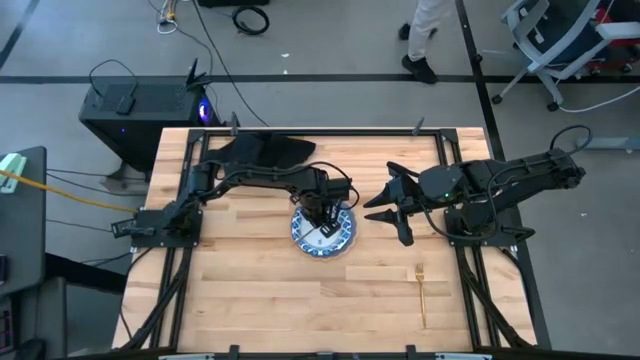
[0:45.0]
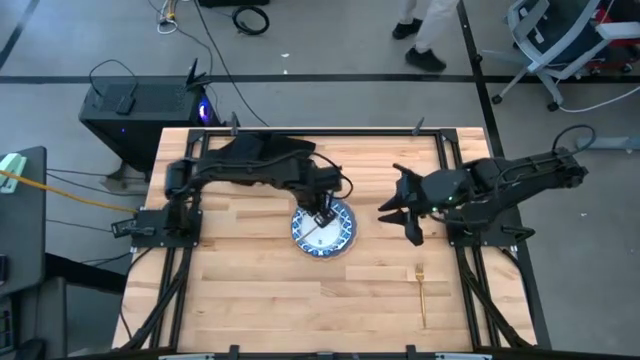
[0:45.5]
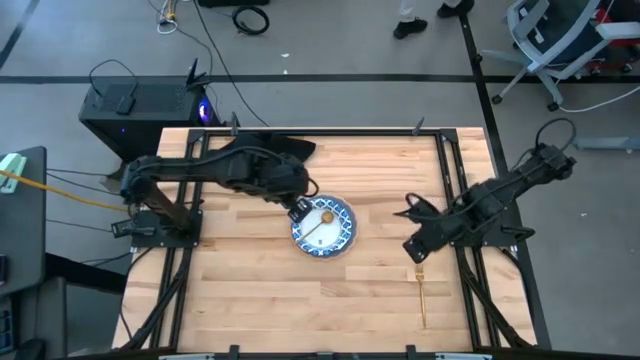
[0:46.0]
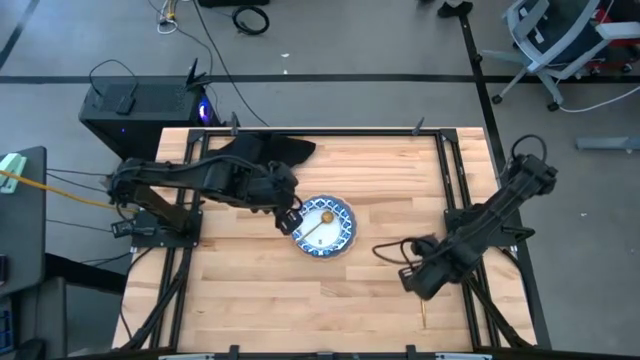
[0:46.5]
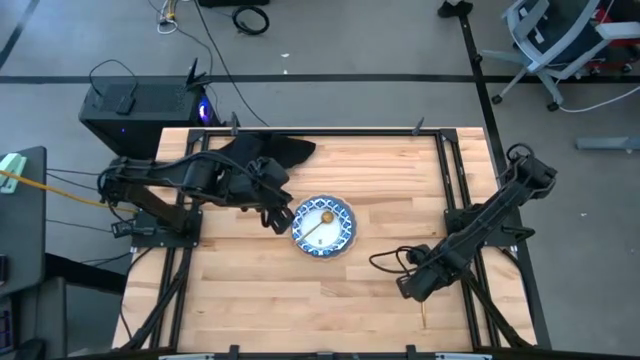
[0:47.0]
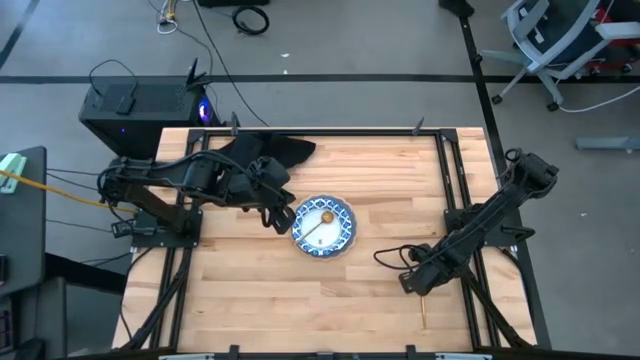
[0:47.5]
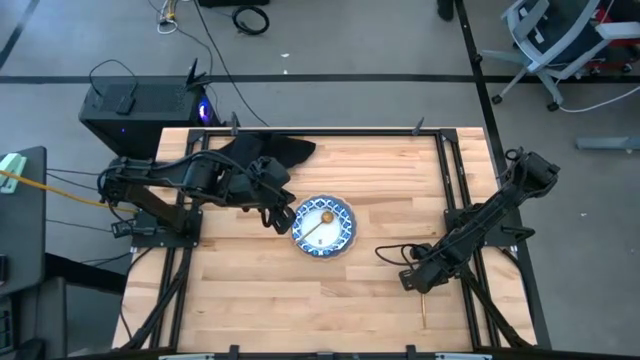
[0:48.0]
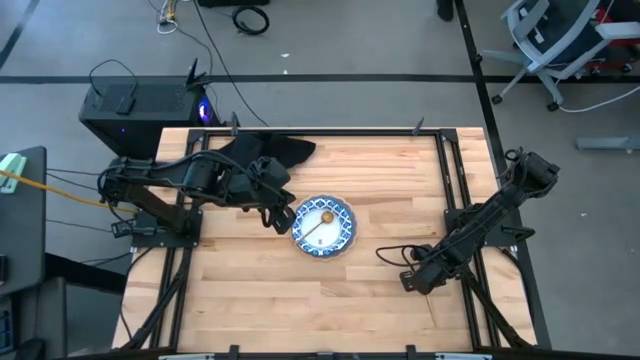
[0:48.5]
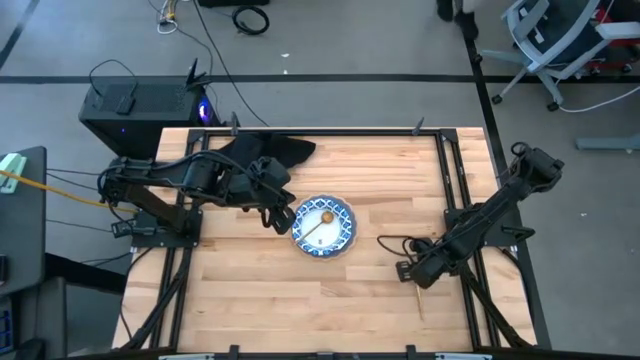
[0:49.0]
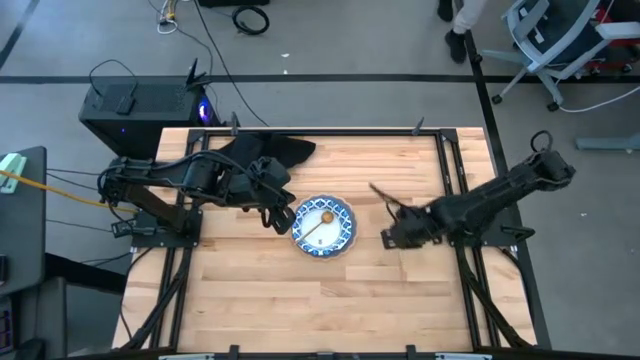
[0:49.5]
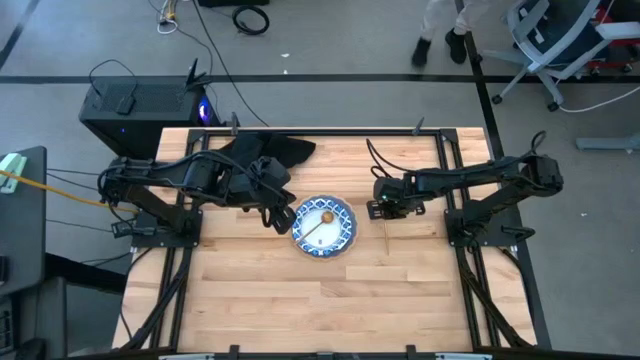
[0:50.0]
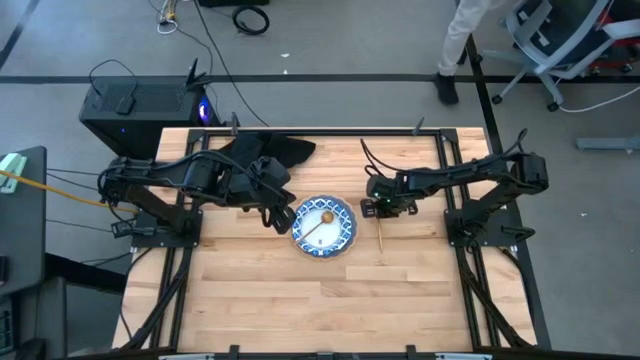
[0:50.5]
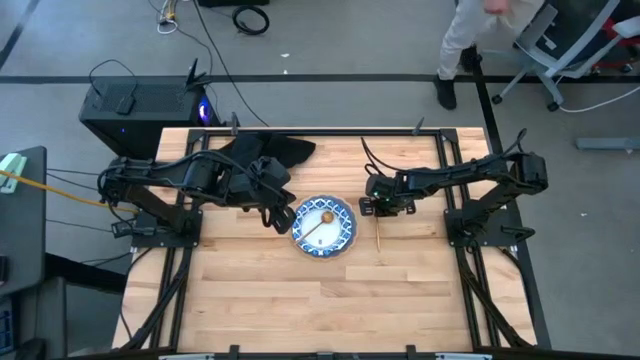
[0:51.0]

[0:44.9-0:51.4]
Task: Set table place
Put the golden fork to the right of the gray plate

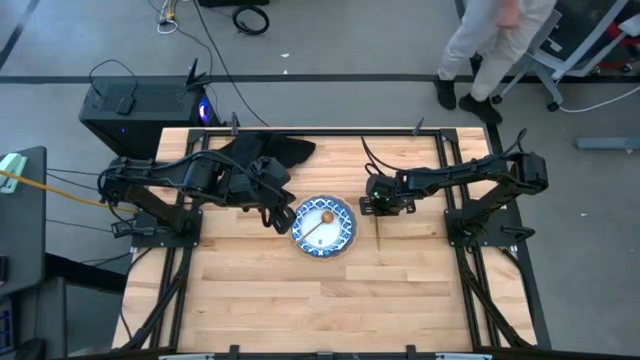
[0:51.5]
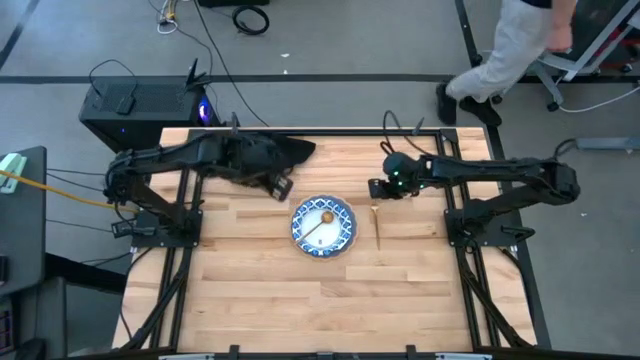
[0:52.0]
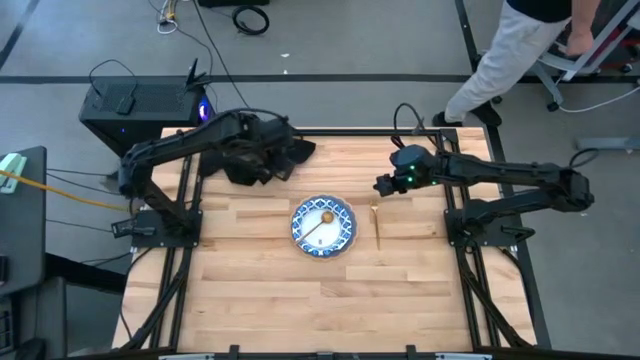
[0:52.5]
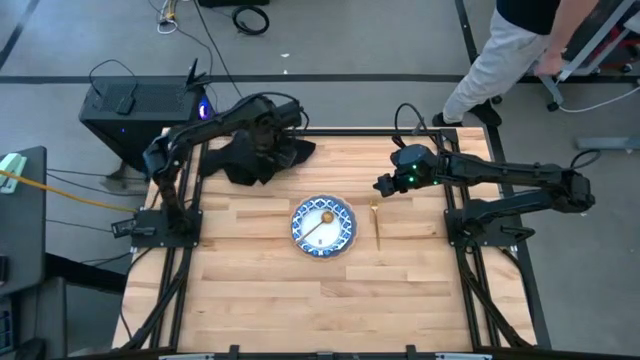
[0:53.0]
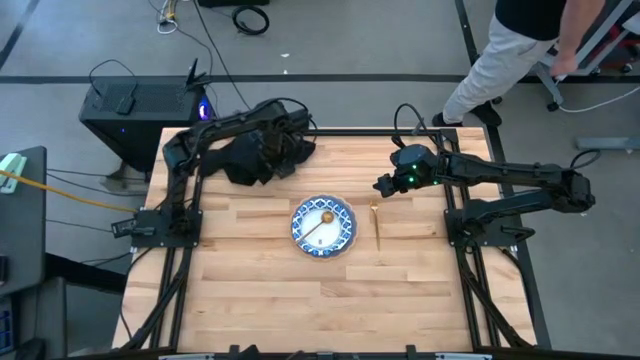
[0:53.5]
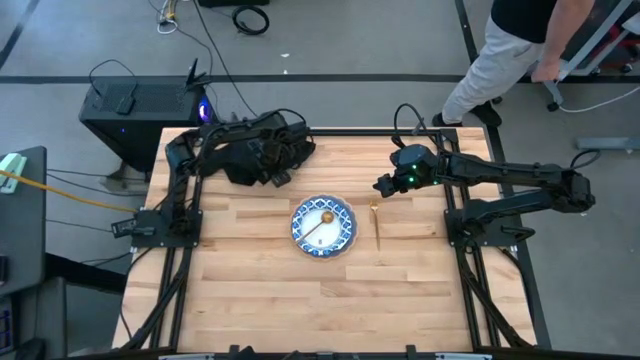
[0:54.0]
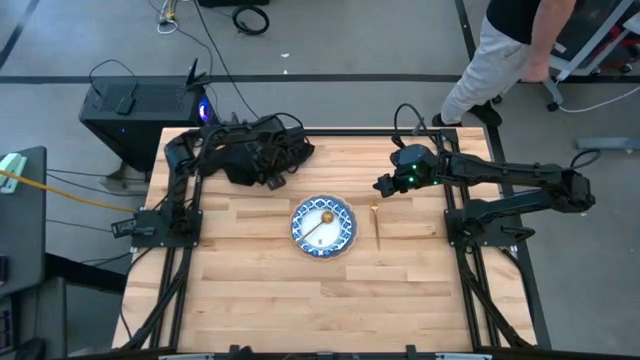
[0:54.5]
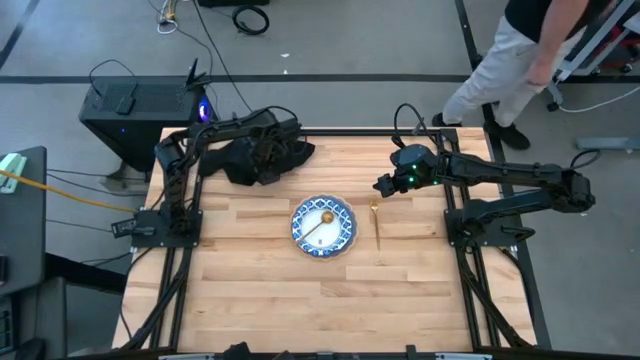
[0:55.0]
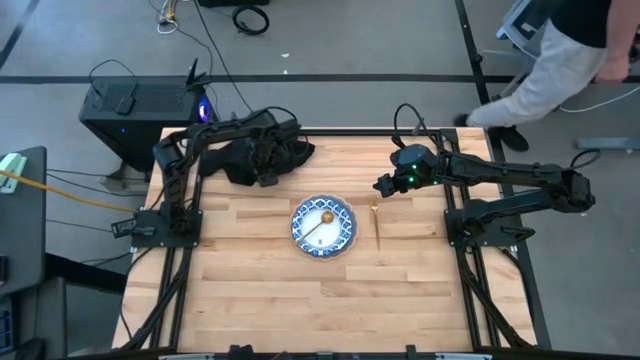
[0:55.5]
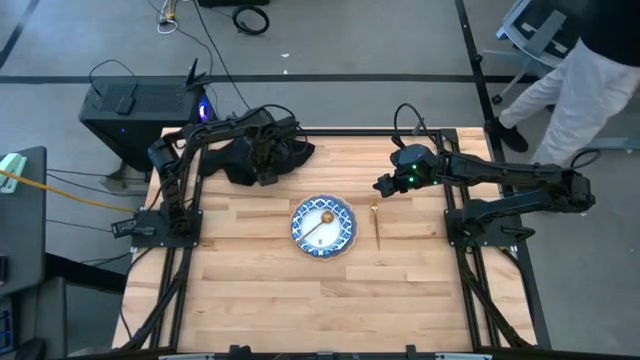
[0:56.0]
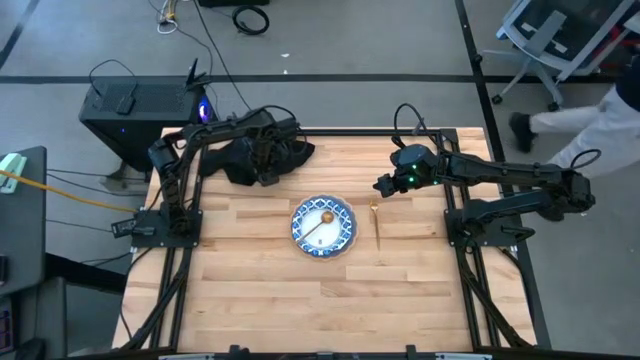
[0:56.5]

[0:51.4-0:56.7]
Fold the black napkin

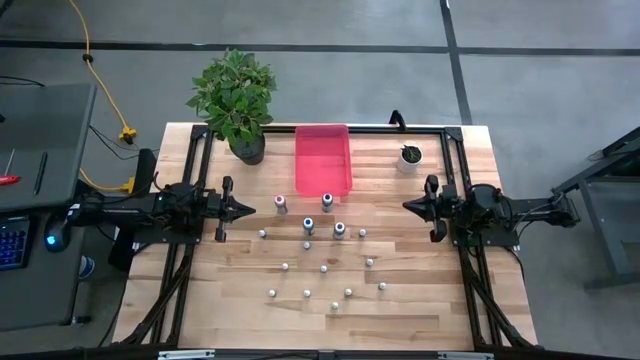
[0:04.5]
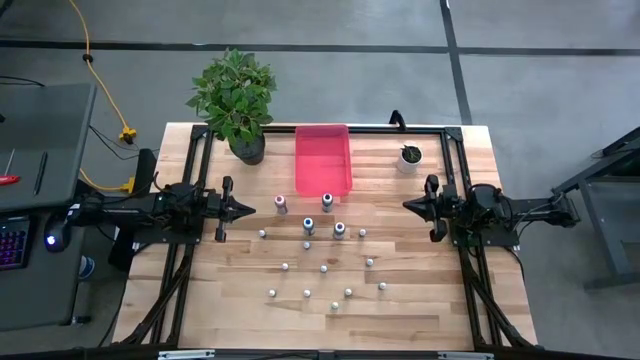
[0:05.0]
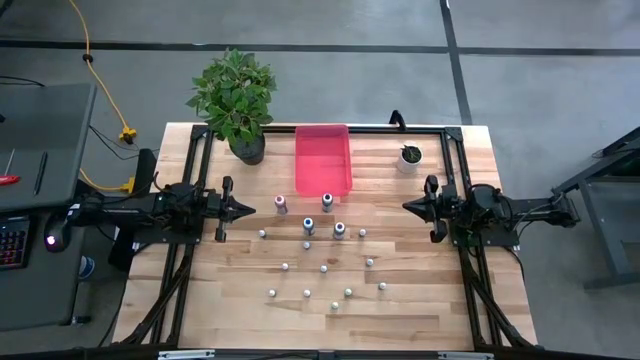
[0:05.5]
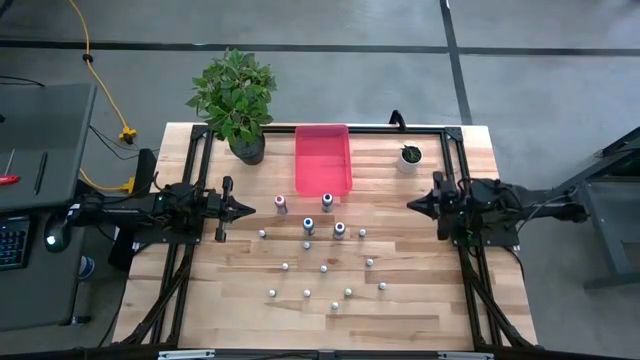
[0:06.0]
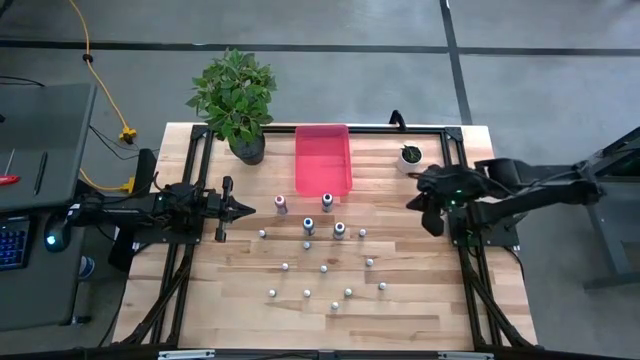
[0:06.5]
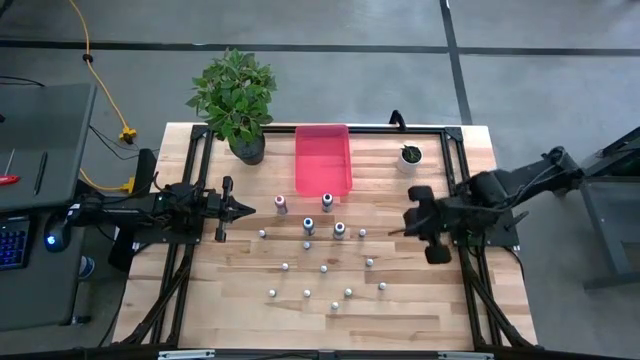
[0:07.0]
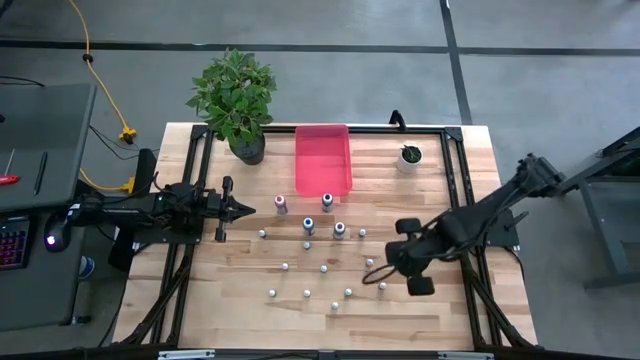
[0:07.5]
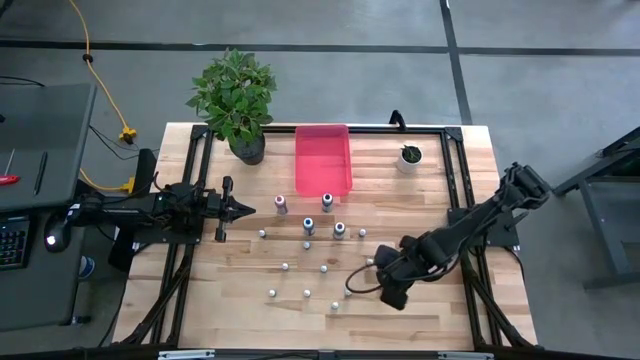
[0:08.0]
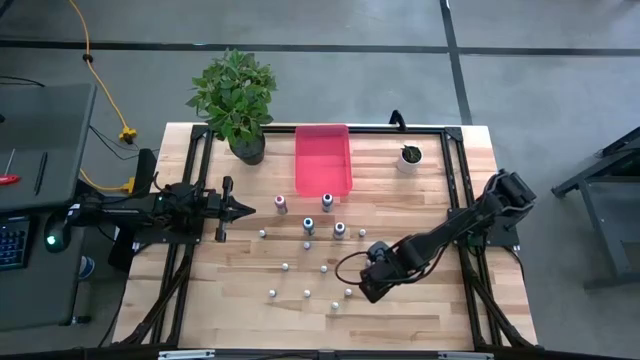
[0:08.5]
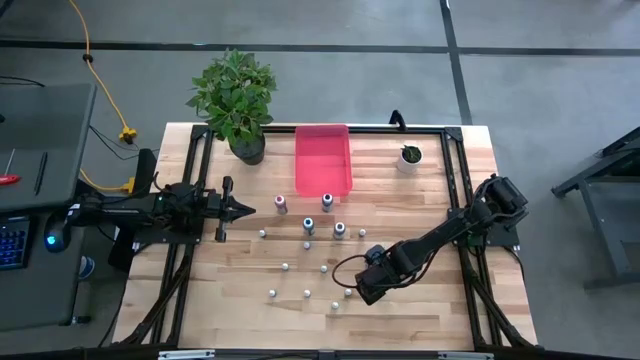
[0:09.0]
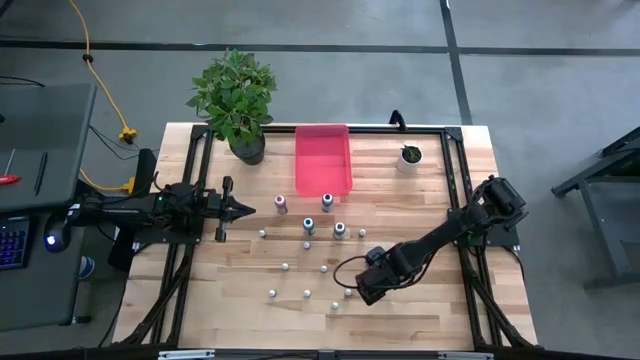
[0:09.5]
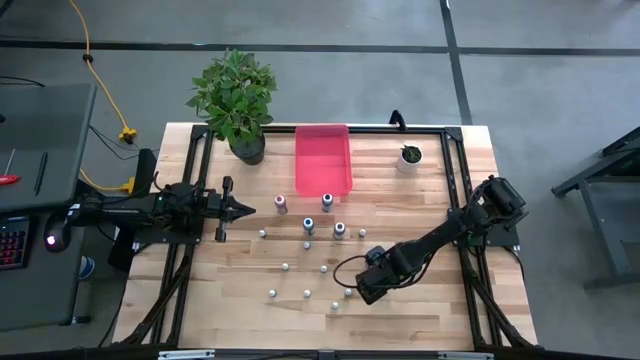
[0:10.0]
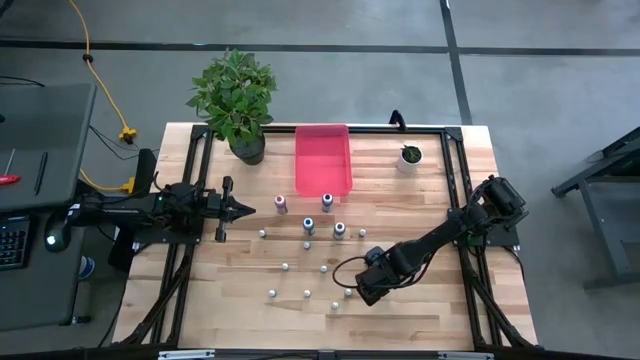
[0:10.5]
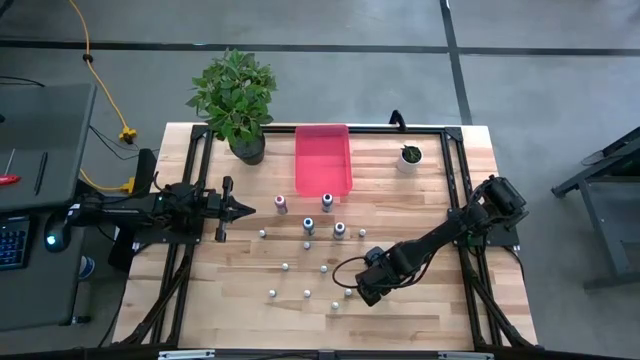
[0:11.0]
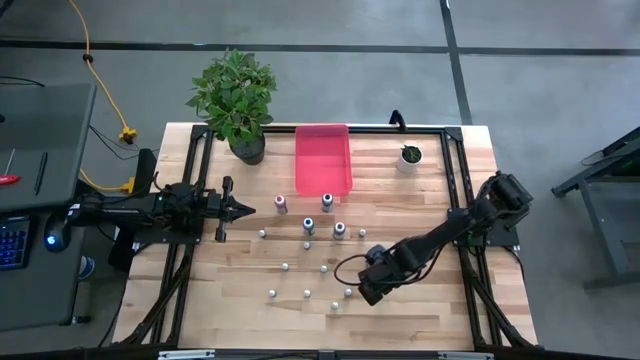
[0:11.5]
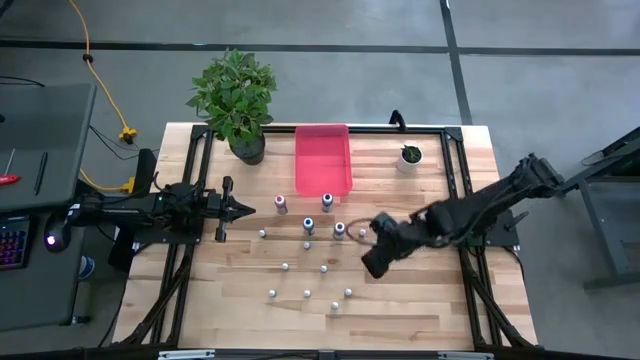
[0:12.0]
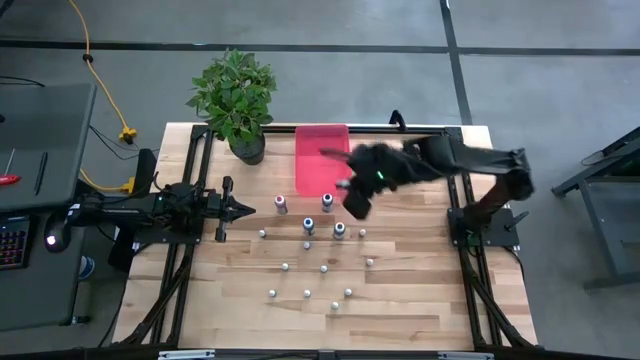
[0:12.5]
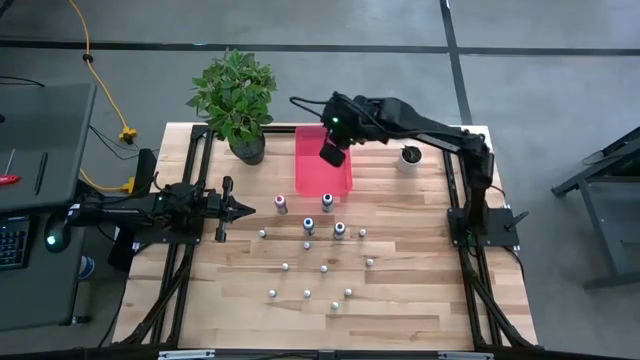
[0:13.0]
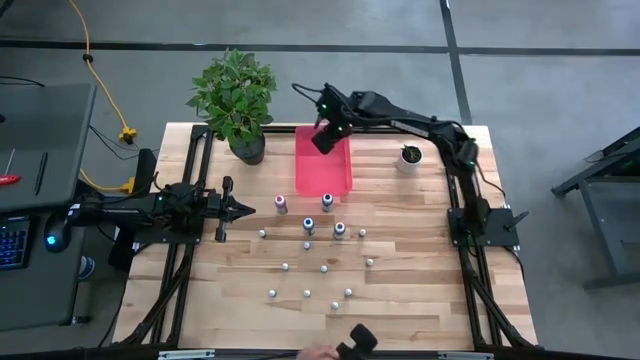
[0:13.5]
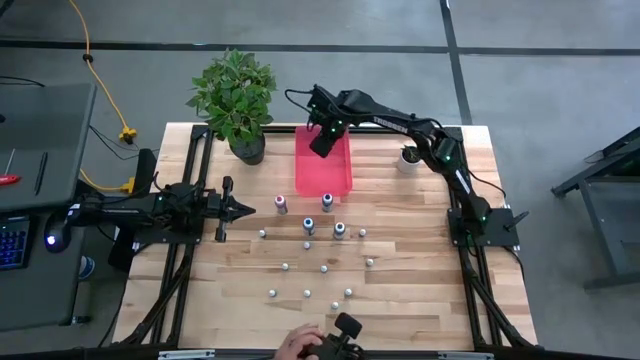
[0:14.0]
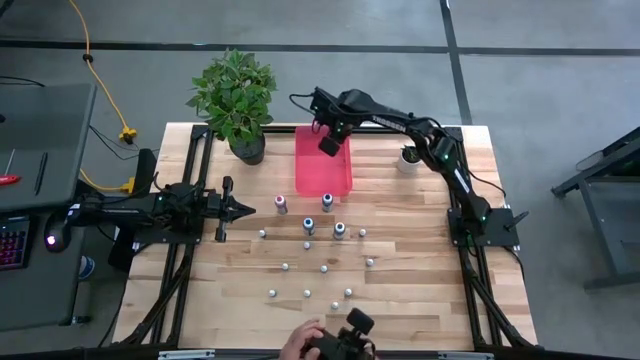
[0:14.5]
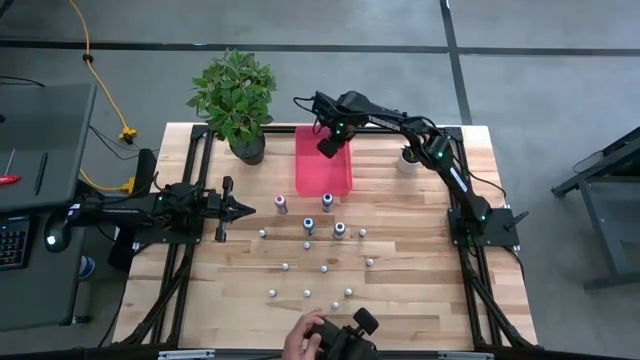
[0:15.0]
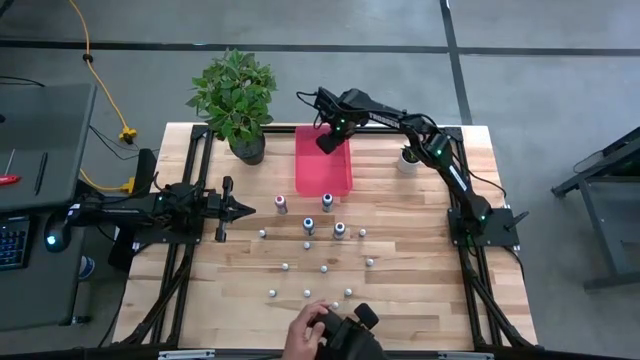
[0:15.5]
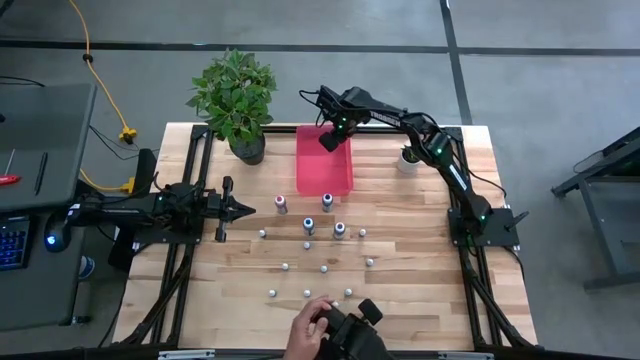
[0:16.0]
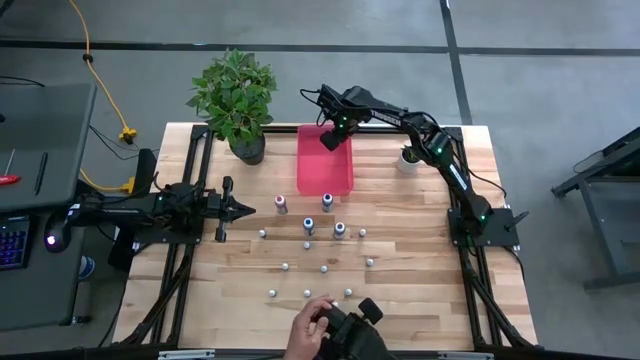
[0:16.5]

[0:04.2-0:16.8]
Task: Pick & Place food coloring
Put the purple food coloring bottle into the pink bin
